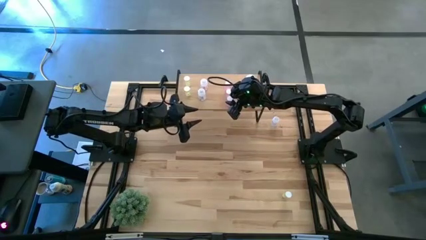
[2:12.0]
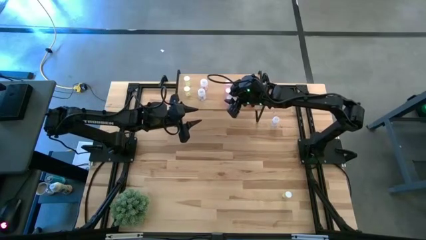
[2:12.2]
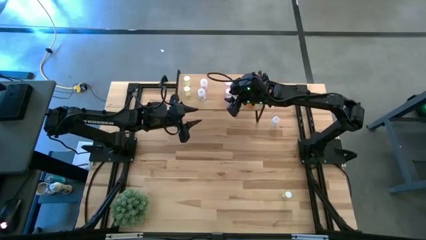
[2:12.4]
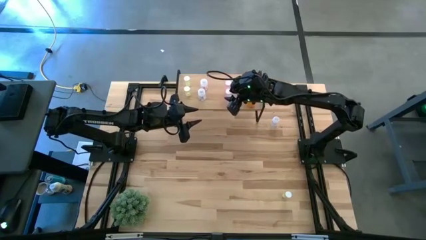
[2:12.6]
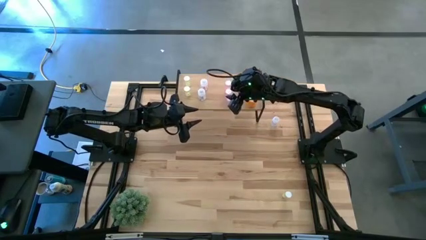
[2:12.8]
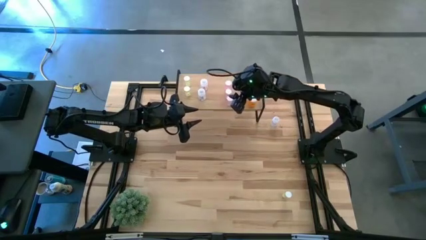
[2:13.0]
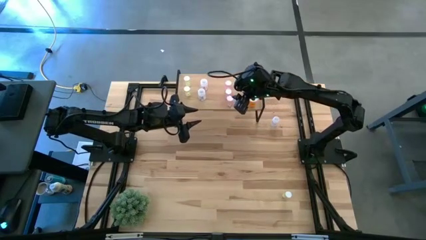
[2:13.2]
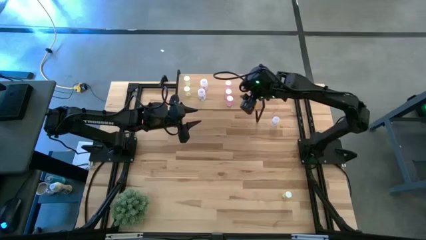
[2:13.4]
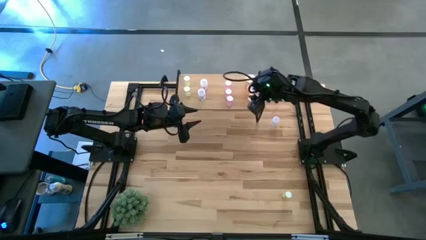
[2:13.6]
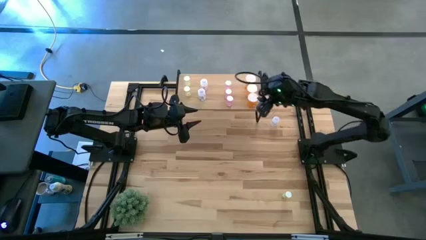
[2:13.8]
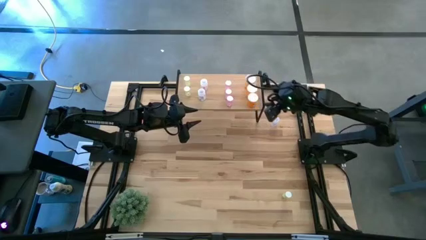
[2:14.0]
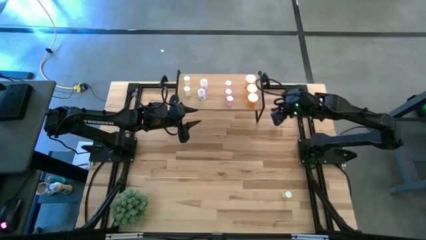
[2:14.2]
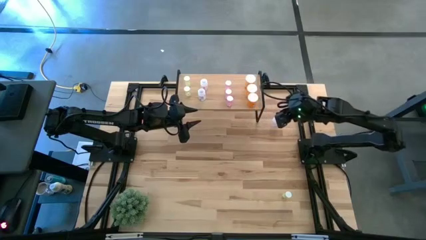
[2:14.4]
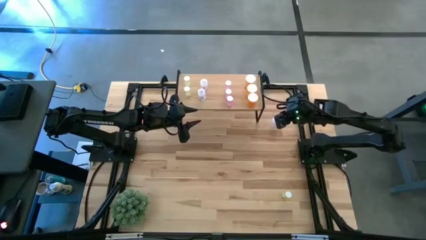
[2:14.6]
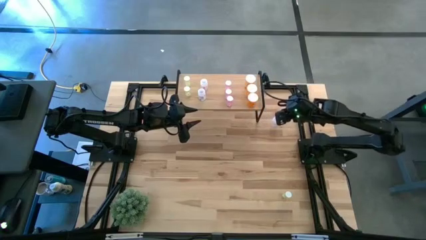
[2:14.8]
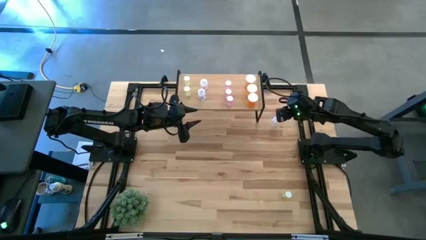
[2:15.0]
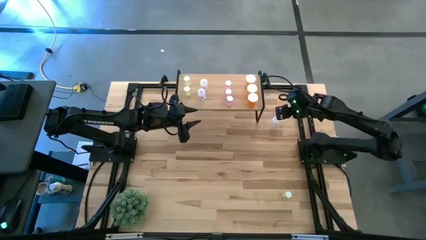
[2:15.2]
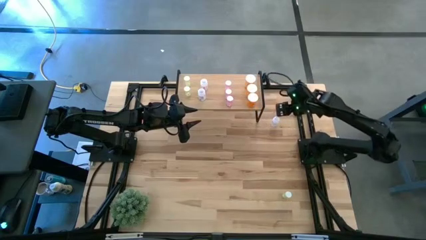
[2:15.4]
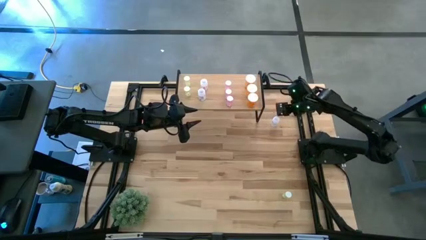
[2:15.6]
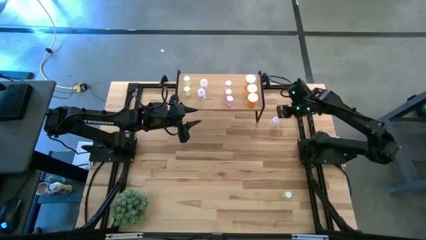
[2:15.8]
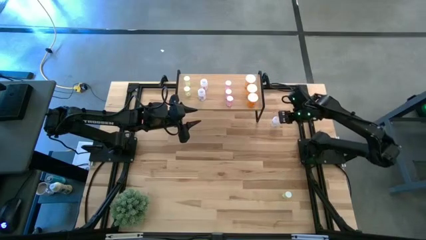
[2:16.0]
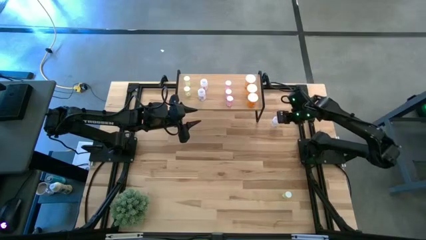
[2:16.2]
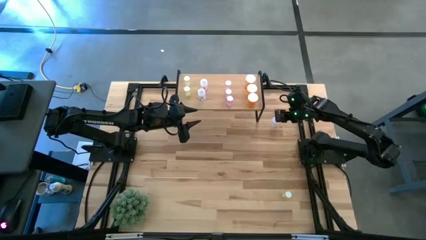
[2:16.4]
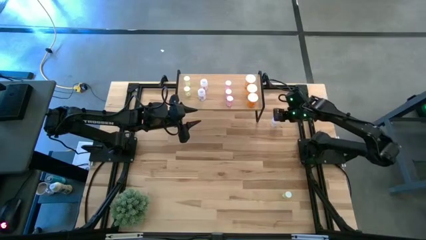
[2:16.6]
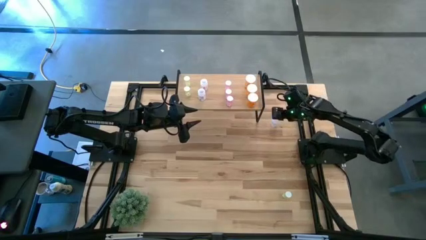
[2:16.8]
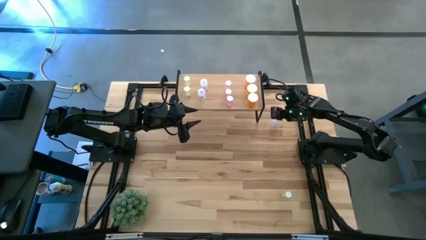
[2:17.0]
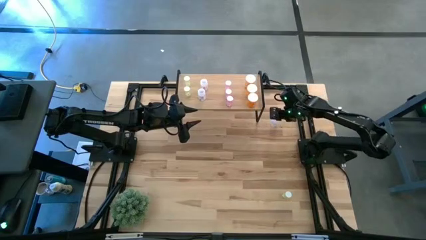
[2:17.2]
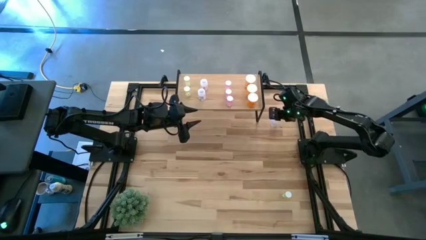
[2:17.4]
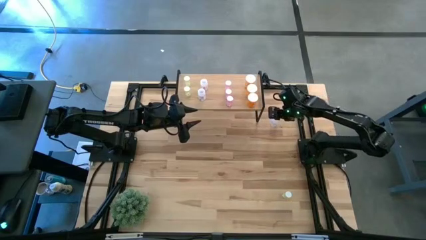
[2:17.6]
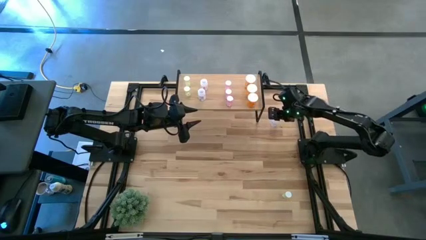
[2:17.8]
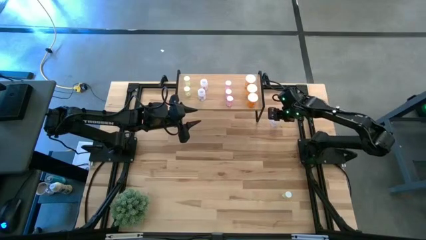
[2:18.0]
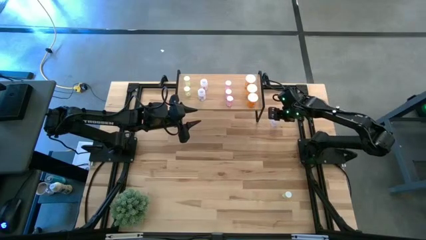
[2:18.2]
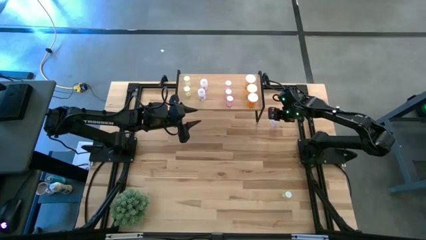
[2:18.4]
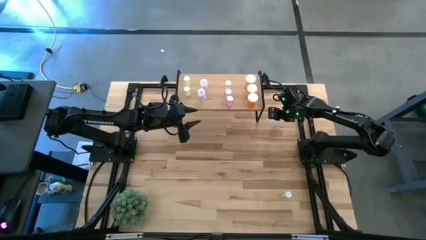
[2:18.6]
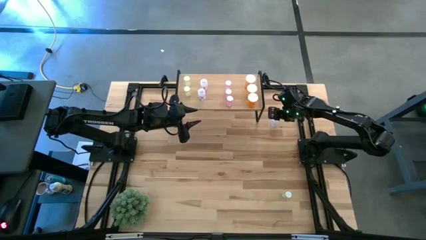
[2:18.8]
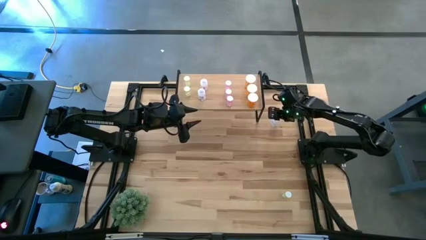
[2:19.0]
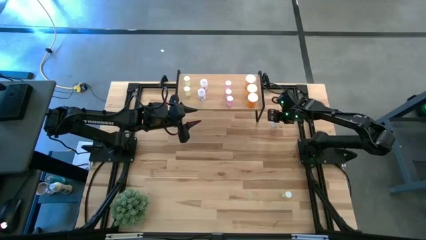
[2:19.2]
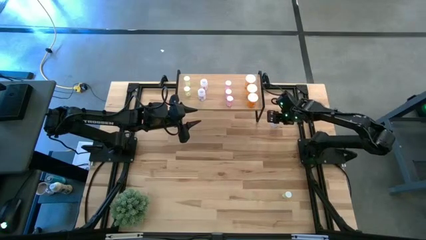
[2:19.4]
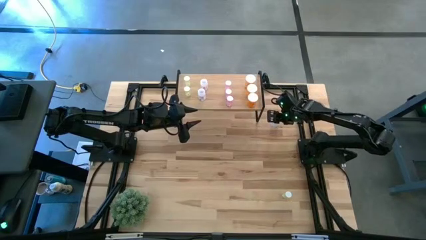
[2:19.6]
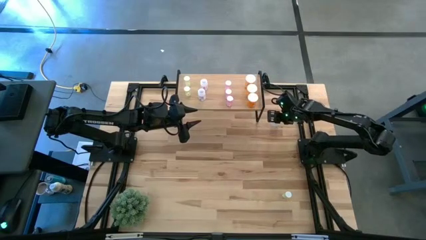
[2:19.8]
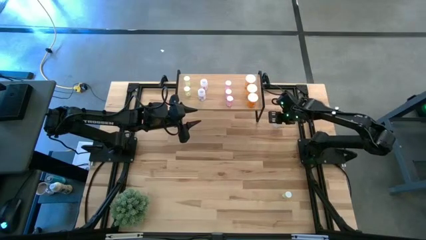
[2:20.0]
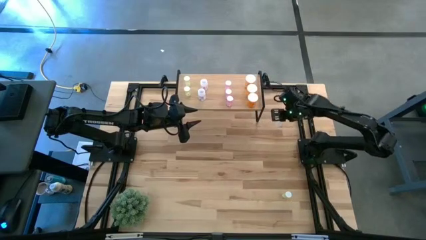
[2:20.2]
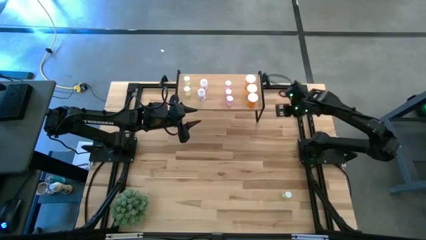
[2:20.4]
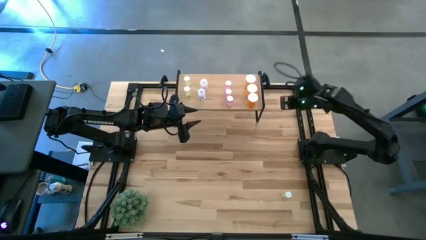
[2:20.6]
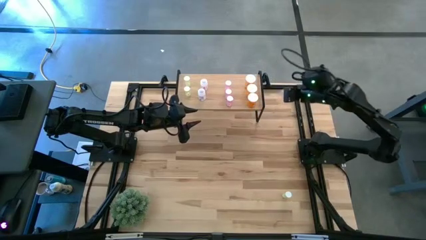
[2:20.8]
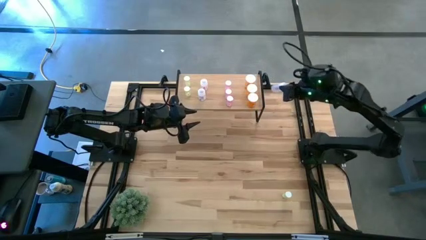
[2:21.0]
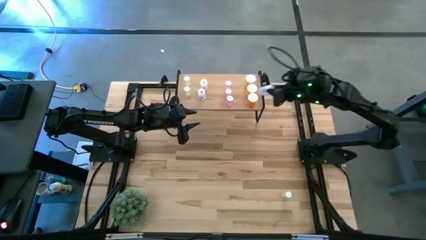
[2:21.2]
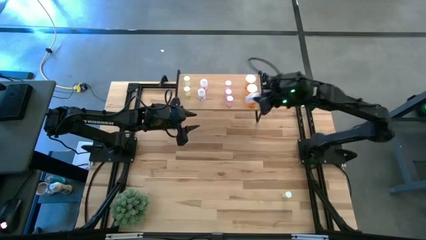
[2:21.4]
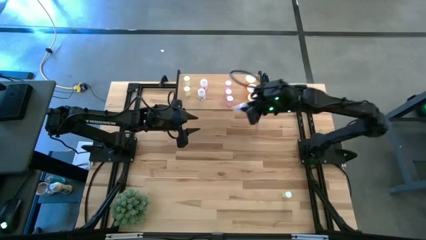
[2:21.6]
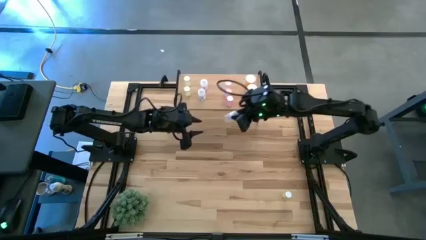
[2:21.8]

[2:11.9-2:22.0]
Task: Pick and place medicine bottles onto shelf by color
Put the white pill bottle aligned with the other white pill bottles on the shelf

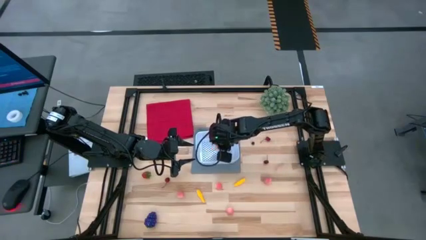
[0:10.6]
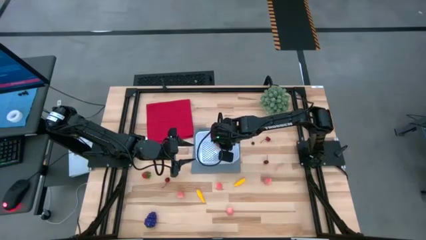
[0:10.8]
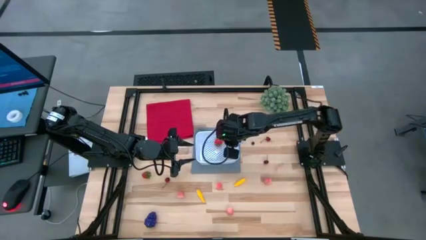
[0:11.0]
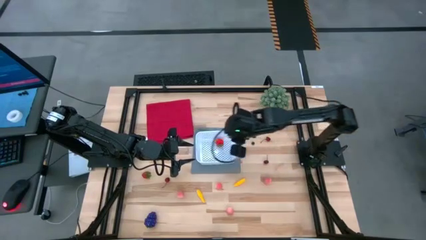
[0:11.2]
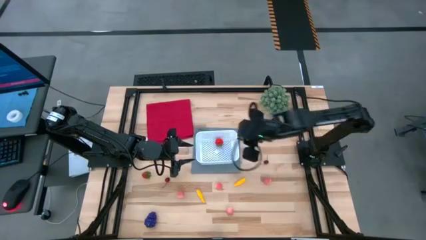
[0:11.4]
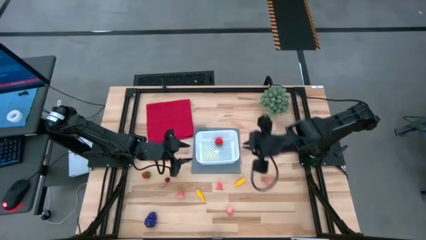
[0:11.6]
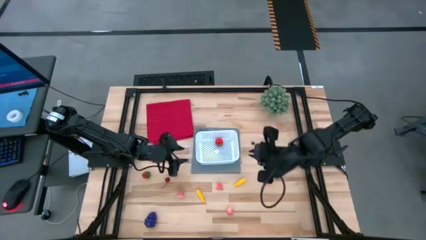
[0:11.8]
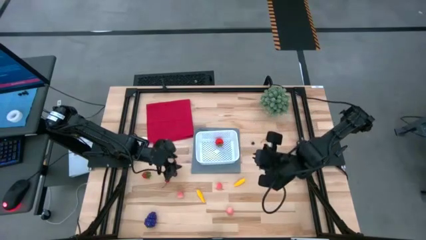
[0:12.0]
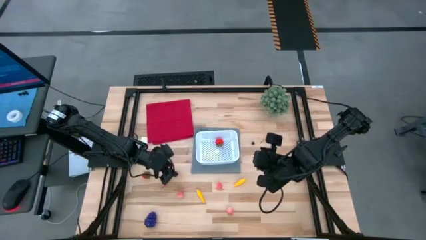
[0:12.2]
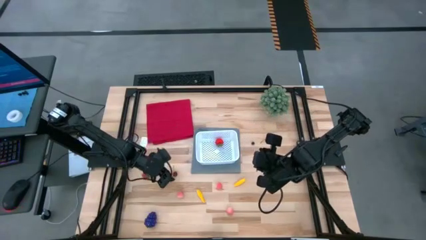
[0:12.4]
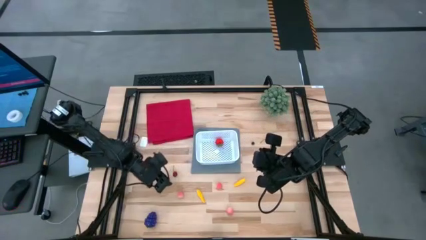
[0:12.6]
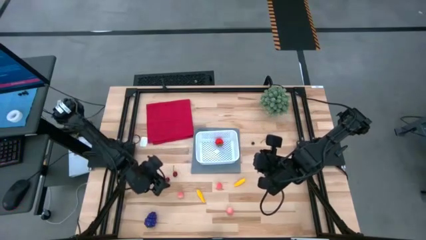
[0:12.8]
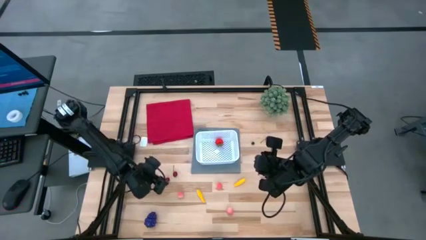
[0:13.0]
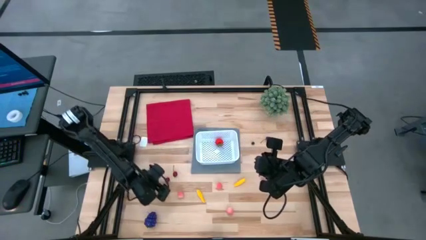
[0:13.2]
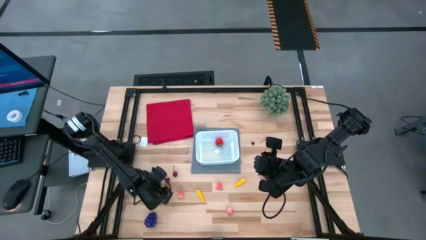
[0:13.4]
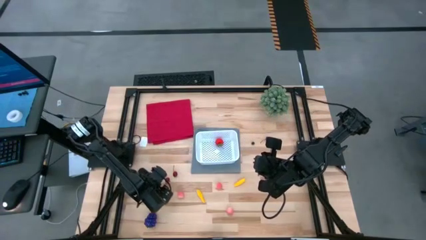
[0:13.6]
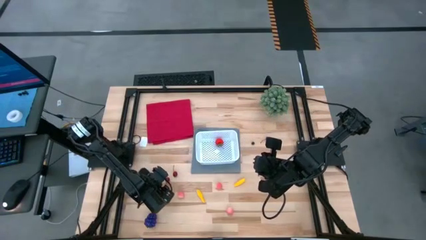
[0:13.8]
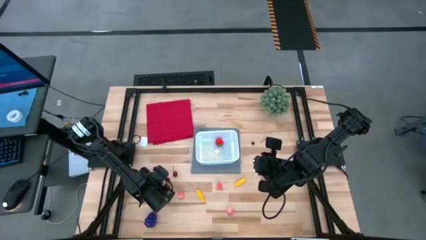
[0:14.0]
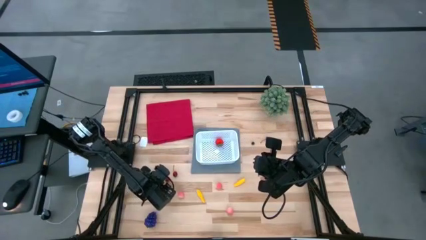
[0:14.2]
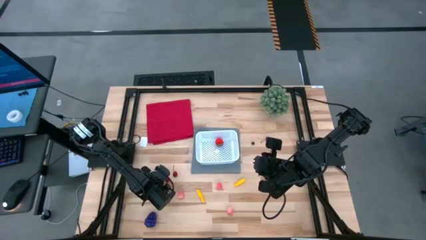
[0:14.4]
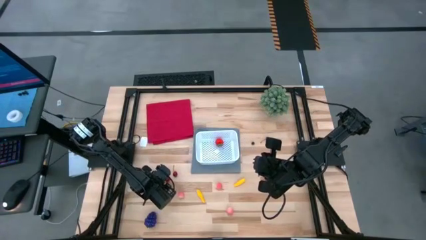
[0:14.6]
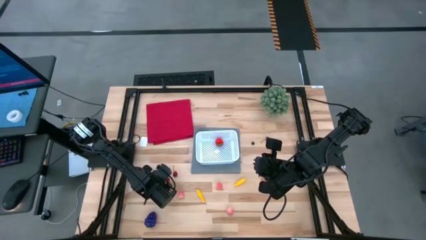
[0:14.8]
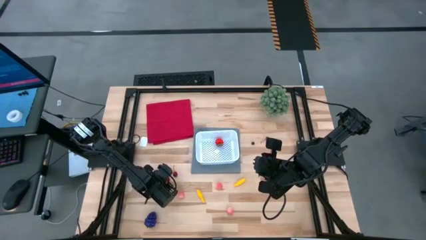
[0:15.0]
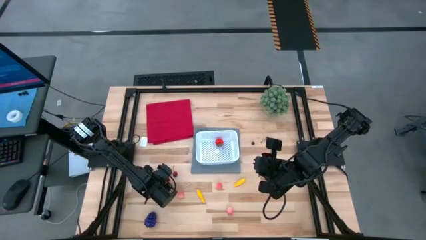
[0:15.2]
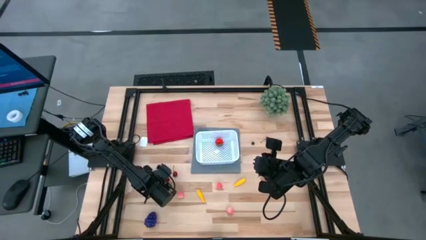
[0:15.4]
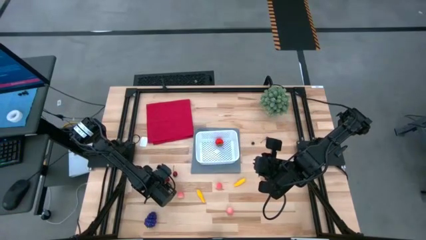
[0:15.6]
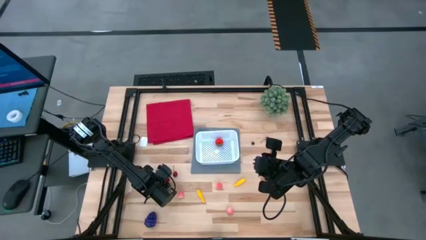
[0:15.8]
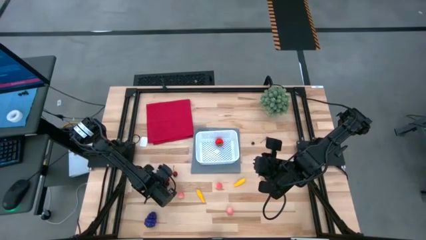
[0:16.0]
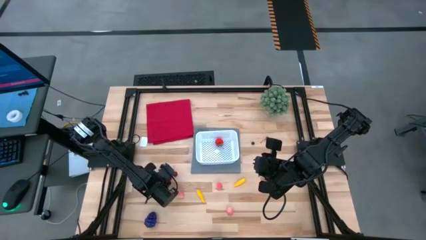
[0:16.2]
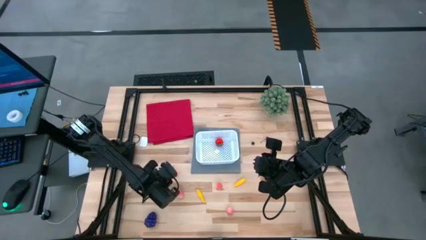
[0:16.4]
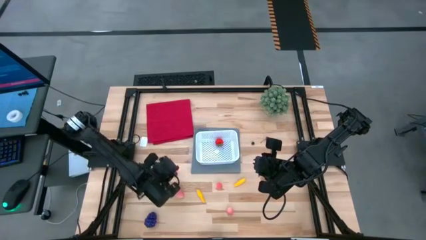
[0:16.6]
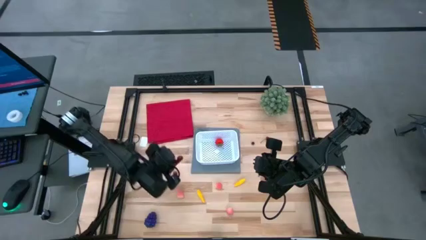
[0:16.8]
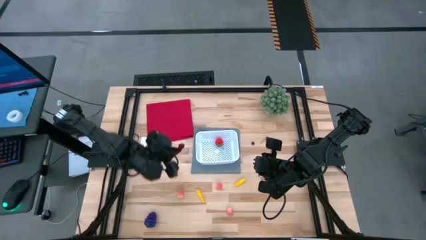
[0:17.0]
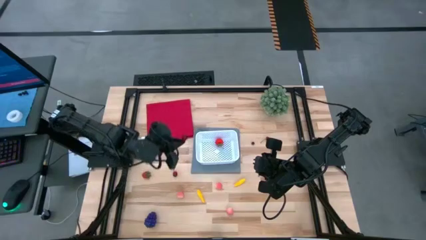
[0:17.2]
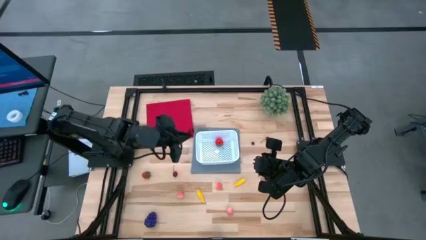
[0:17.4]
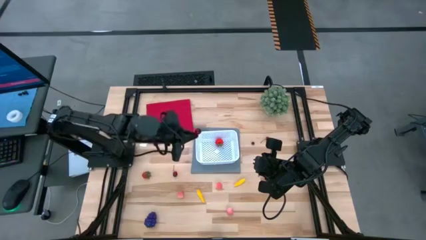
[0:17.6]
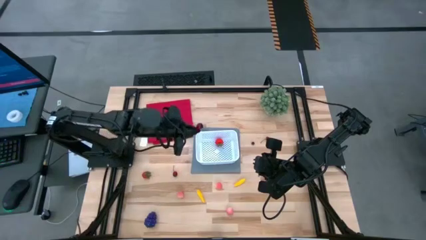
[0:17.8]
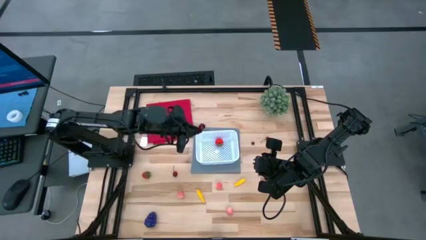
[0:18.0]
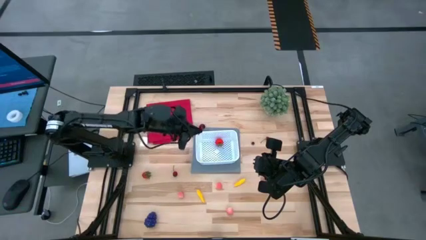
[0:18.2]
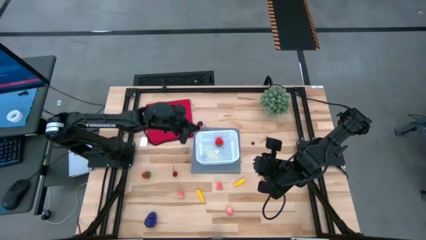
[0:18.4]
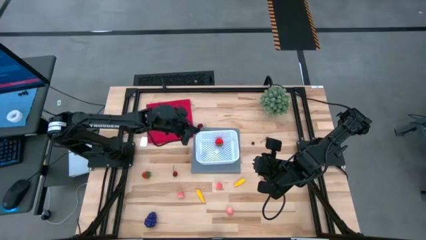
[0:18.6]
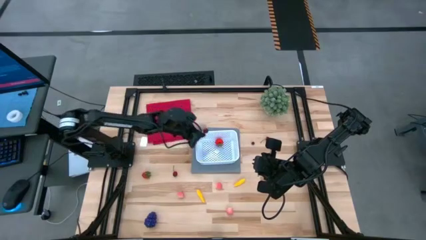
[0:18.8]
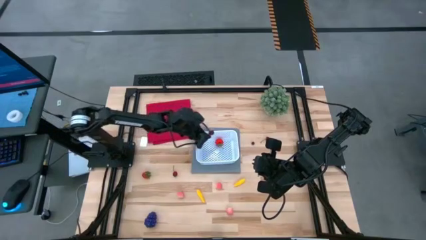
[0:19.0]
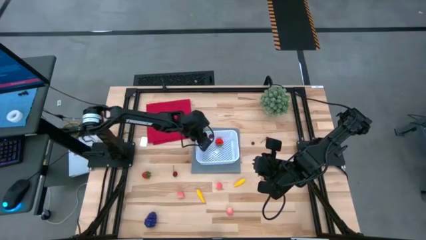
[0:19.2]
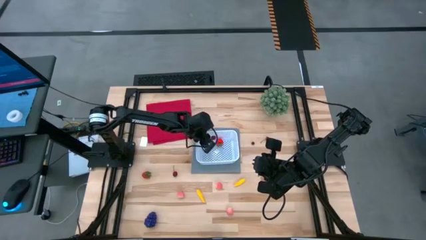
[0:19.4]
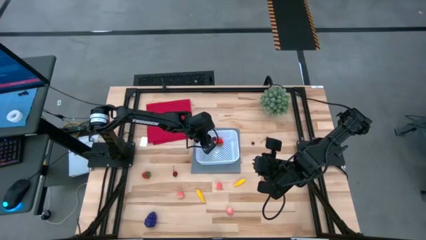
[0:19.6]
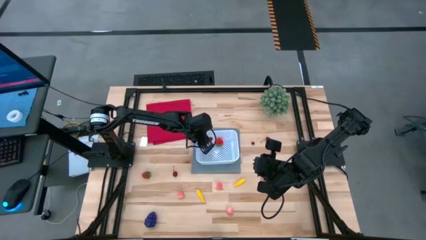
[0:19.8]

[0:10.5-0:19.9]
Task: Pick and placing Produce into tupperware
Put the bottom left cherry into the white basket
